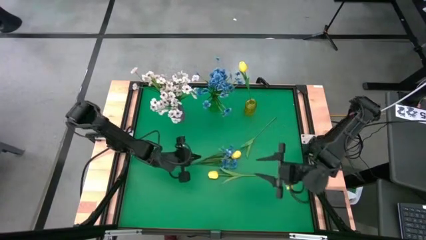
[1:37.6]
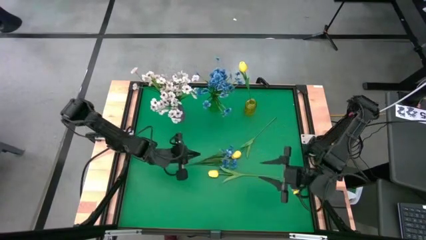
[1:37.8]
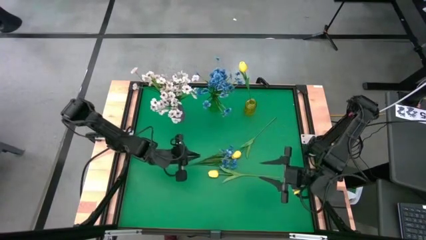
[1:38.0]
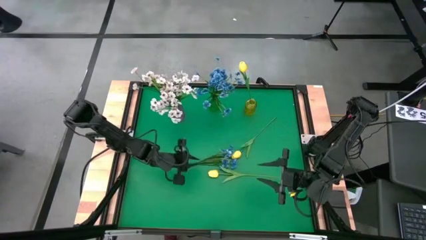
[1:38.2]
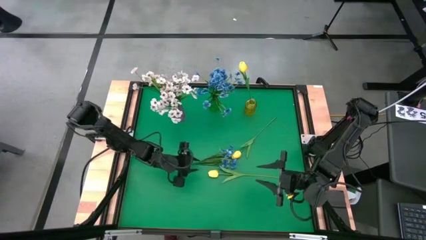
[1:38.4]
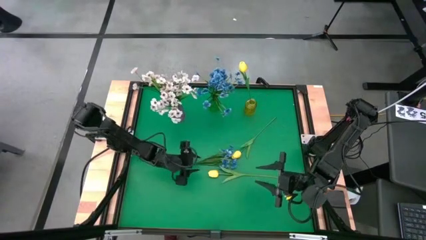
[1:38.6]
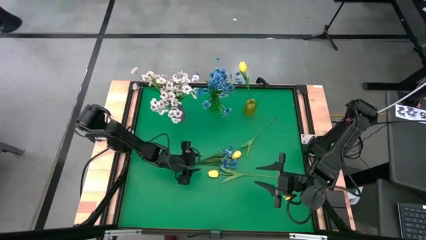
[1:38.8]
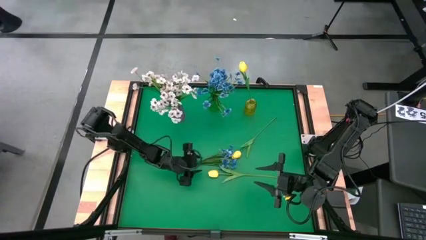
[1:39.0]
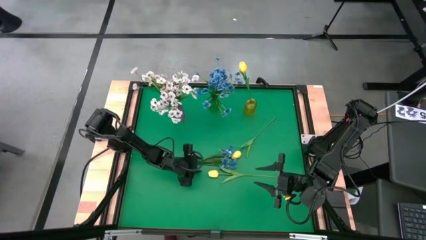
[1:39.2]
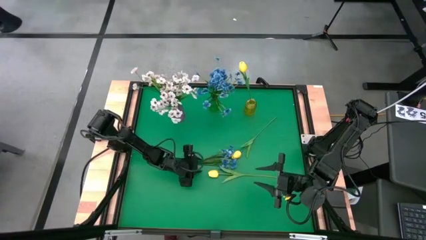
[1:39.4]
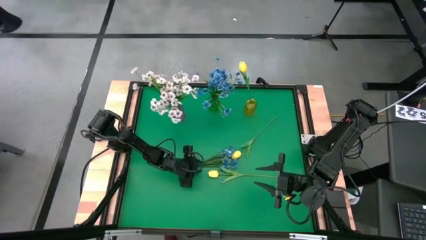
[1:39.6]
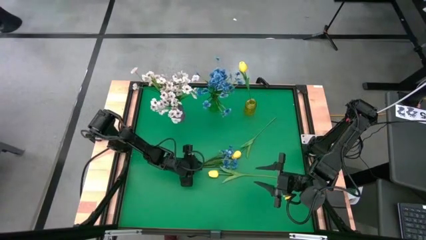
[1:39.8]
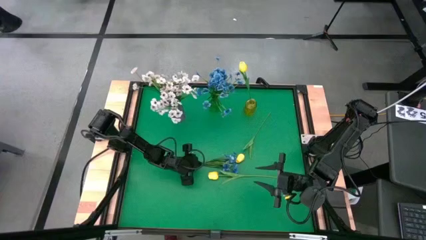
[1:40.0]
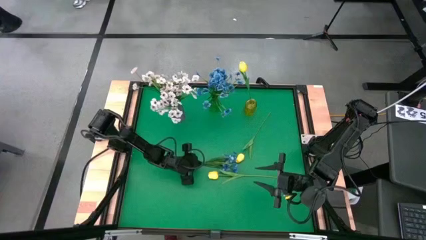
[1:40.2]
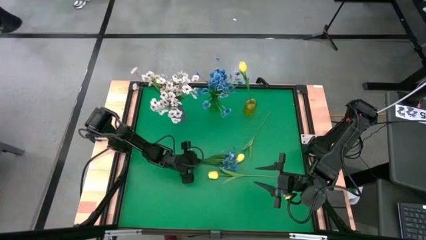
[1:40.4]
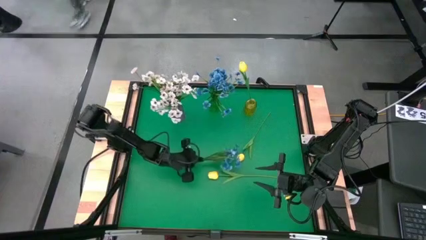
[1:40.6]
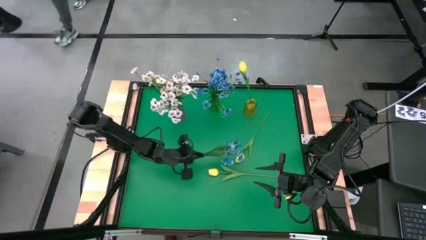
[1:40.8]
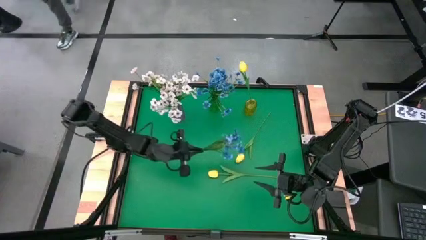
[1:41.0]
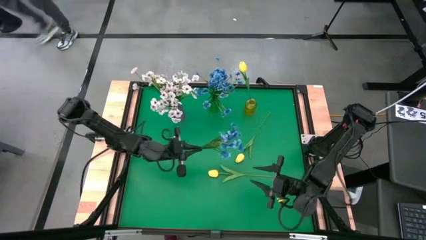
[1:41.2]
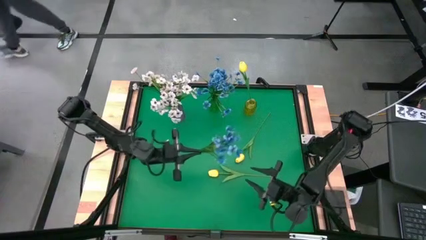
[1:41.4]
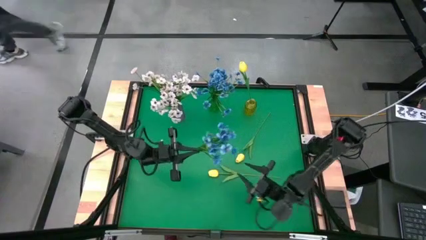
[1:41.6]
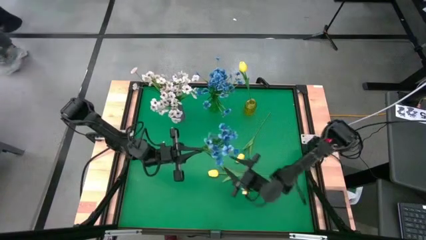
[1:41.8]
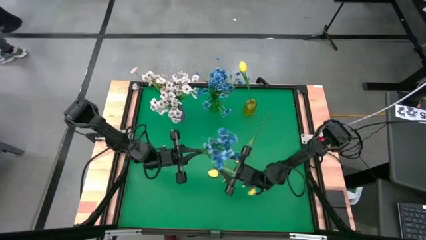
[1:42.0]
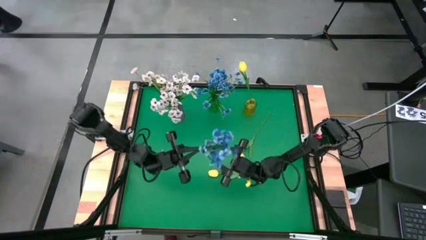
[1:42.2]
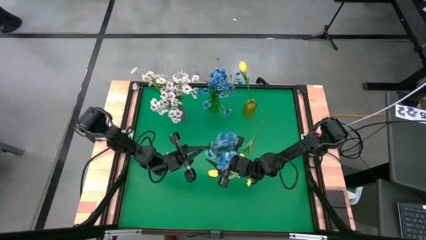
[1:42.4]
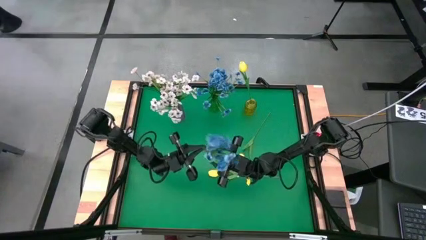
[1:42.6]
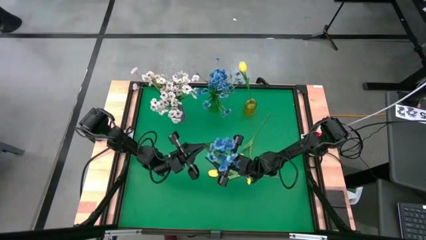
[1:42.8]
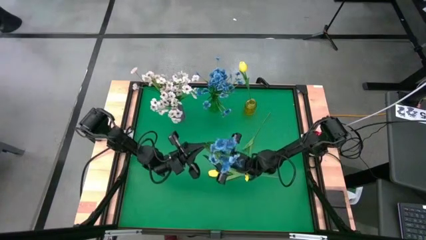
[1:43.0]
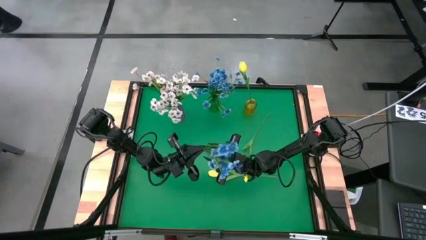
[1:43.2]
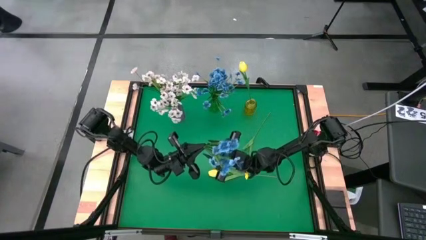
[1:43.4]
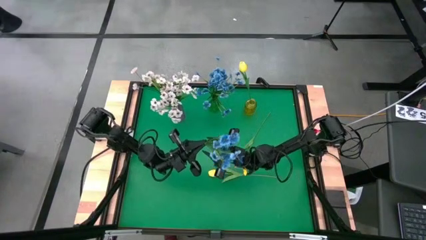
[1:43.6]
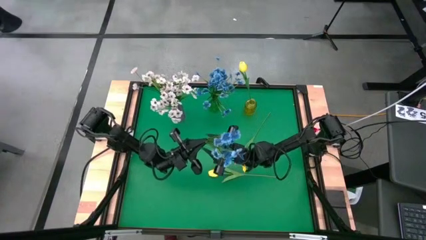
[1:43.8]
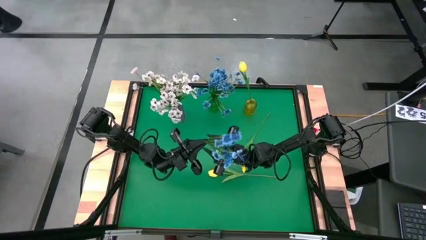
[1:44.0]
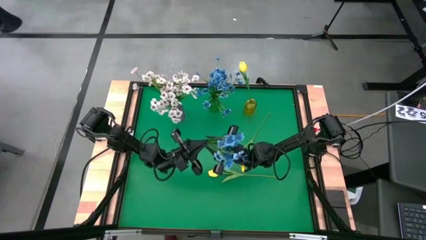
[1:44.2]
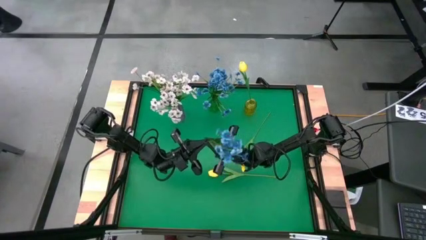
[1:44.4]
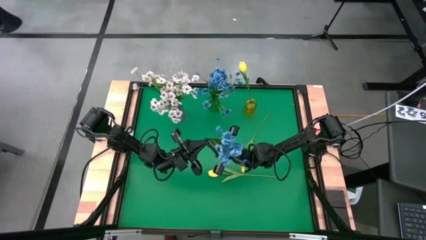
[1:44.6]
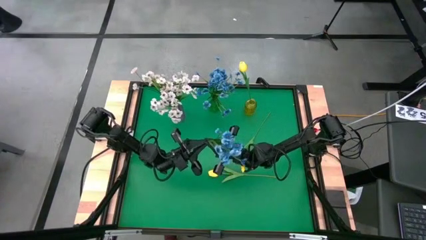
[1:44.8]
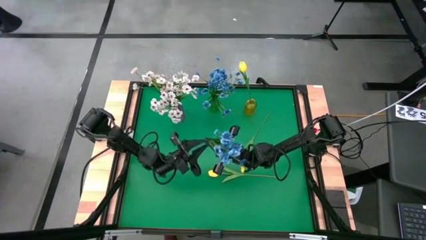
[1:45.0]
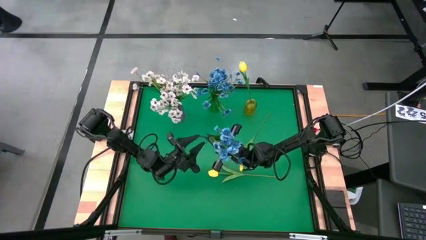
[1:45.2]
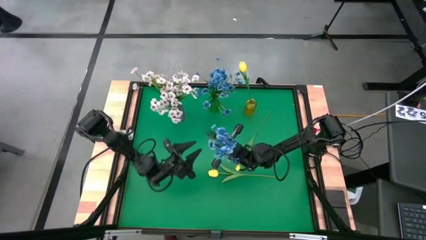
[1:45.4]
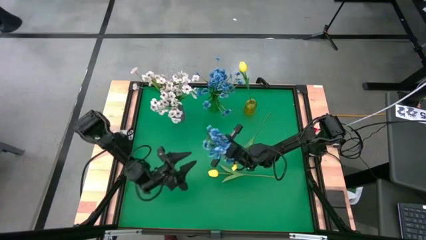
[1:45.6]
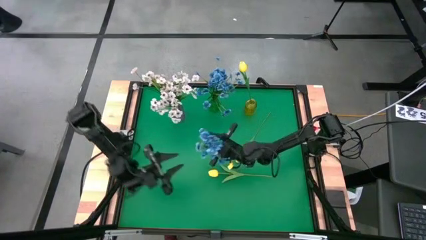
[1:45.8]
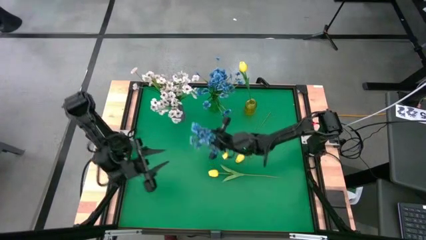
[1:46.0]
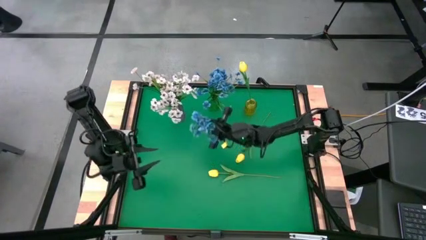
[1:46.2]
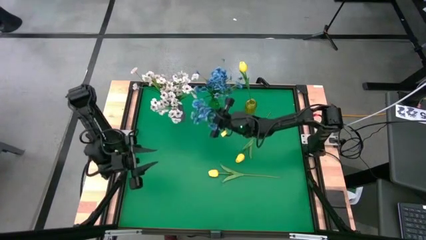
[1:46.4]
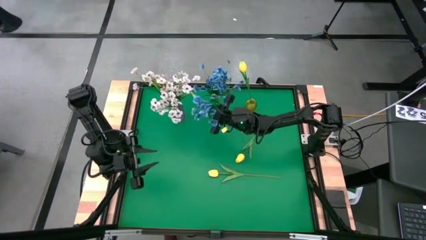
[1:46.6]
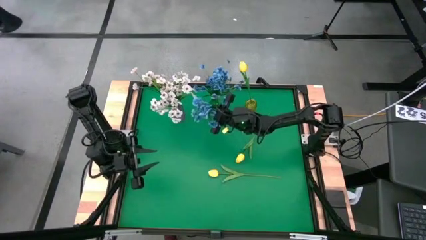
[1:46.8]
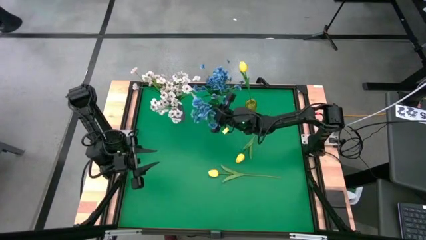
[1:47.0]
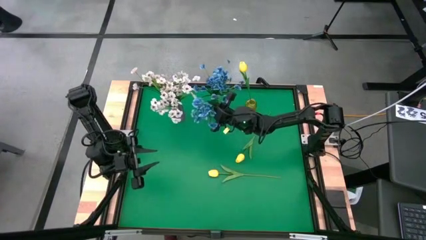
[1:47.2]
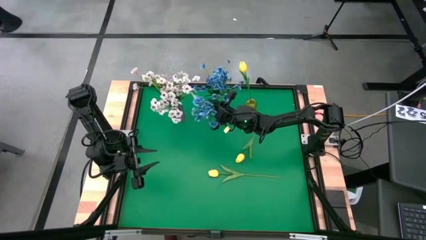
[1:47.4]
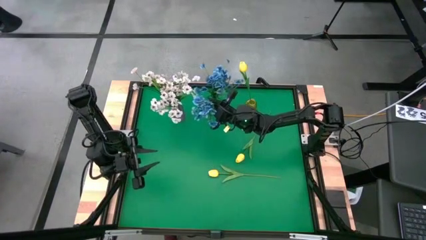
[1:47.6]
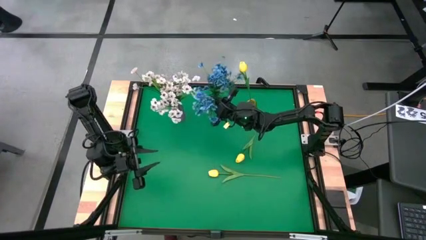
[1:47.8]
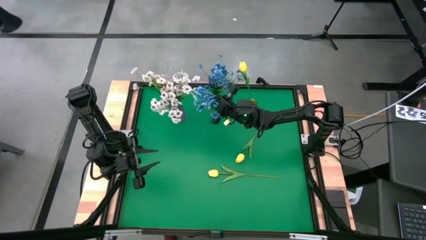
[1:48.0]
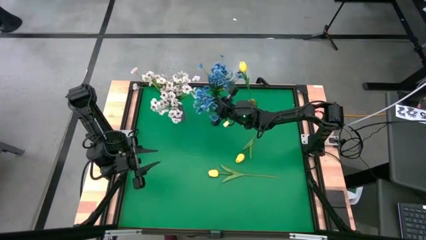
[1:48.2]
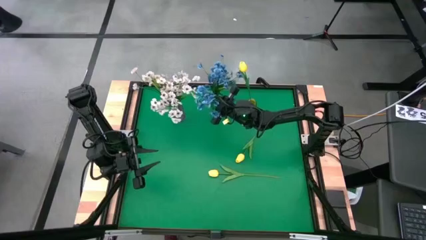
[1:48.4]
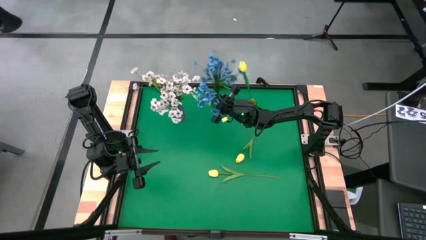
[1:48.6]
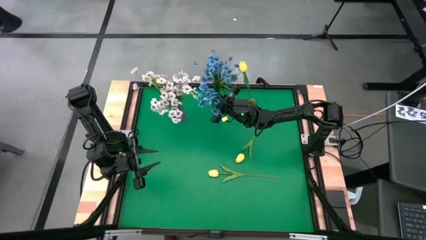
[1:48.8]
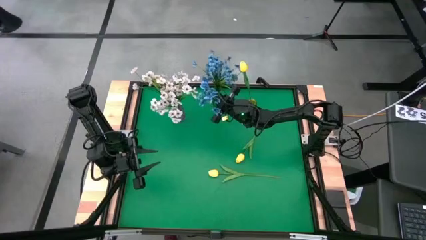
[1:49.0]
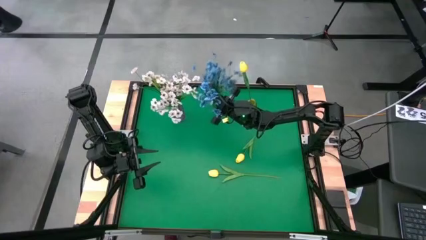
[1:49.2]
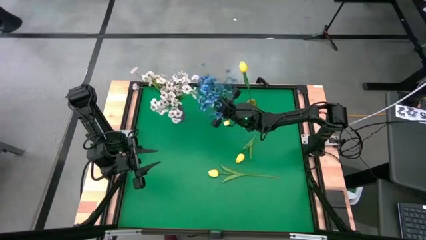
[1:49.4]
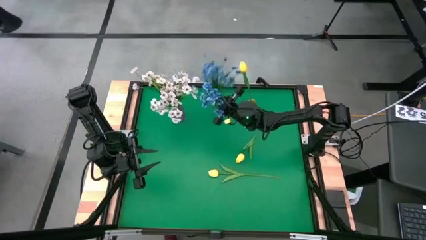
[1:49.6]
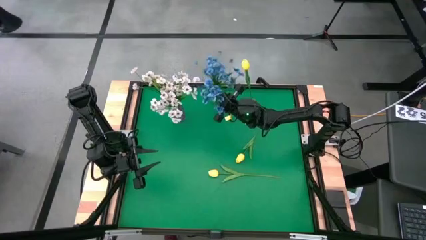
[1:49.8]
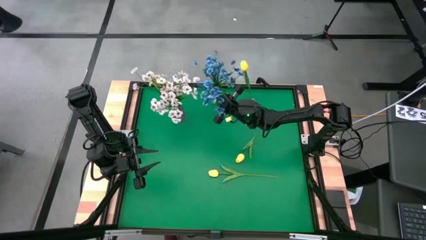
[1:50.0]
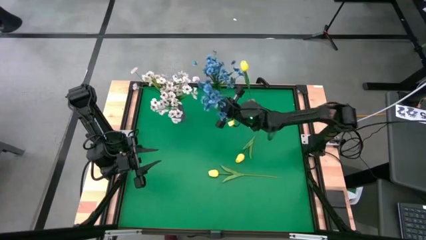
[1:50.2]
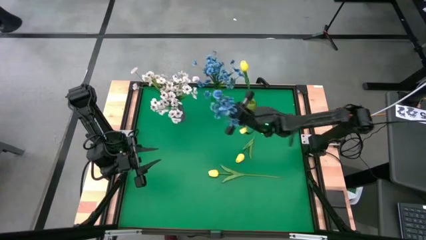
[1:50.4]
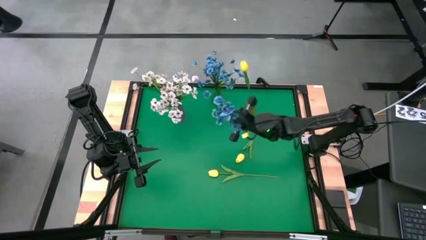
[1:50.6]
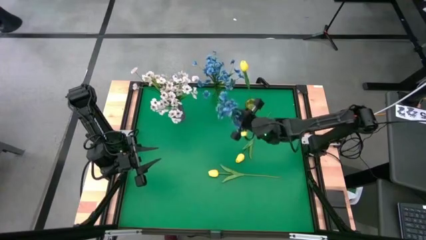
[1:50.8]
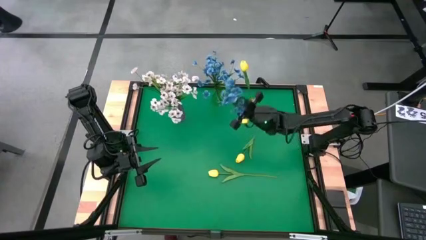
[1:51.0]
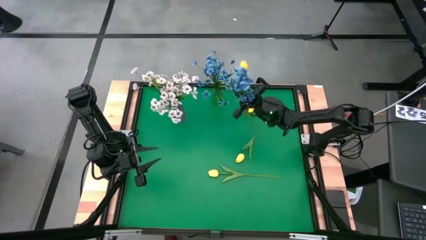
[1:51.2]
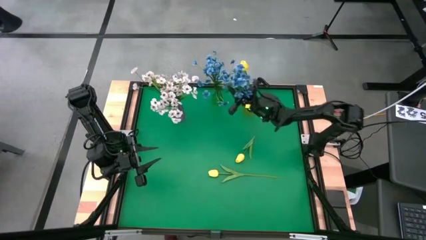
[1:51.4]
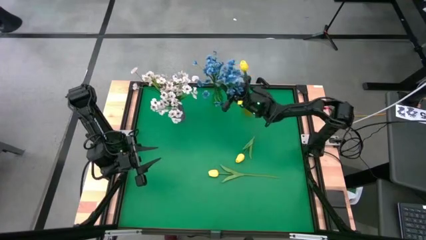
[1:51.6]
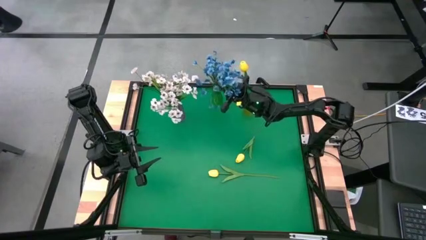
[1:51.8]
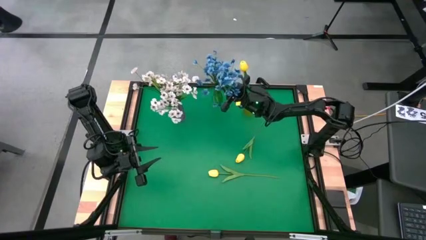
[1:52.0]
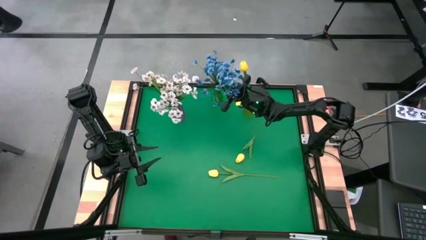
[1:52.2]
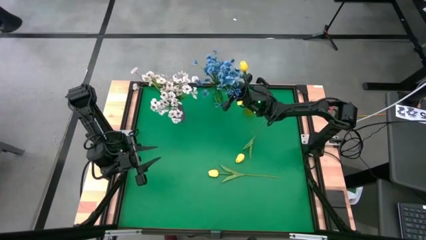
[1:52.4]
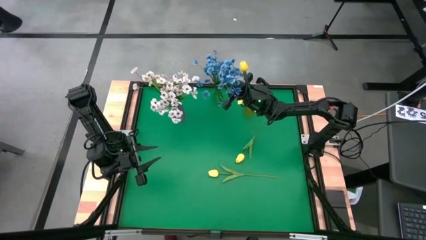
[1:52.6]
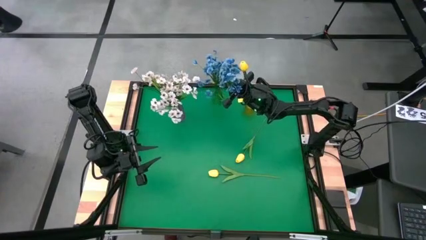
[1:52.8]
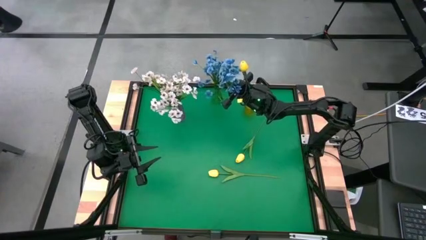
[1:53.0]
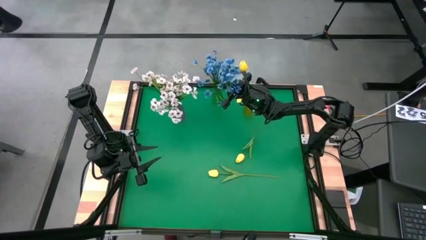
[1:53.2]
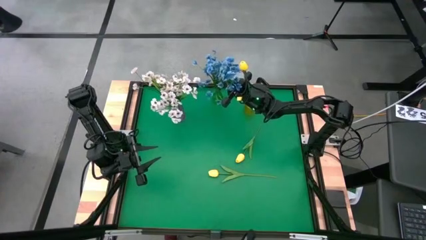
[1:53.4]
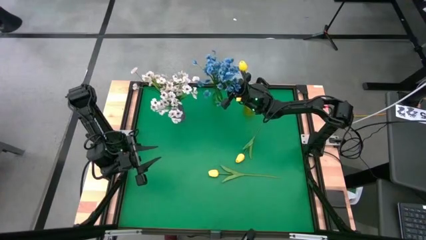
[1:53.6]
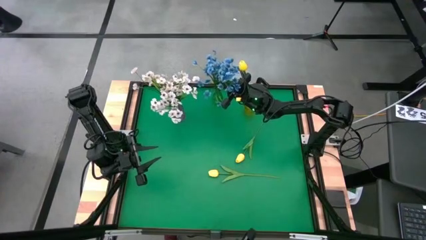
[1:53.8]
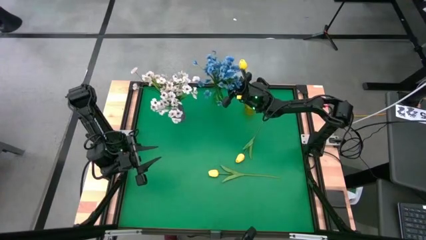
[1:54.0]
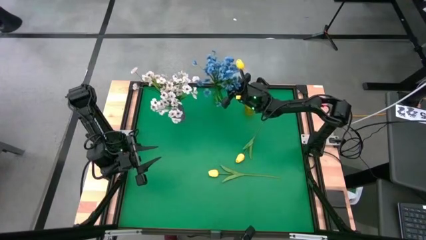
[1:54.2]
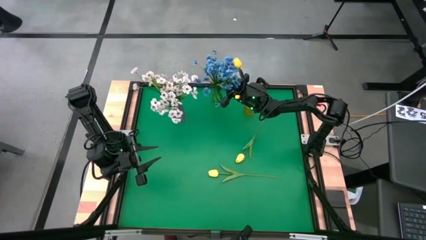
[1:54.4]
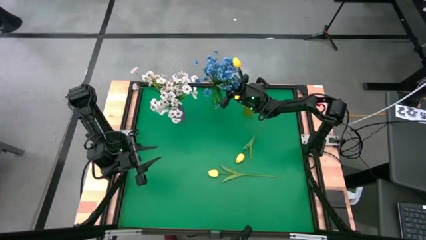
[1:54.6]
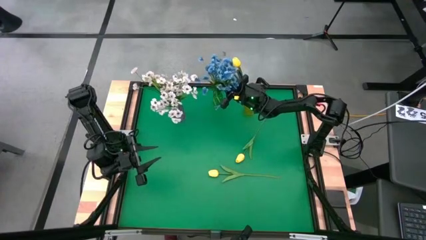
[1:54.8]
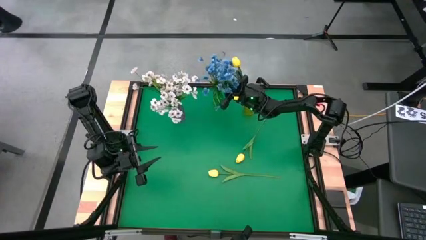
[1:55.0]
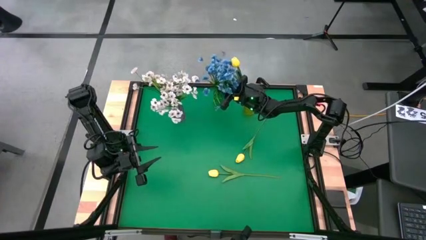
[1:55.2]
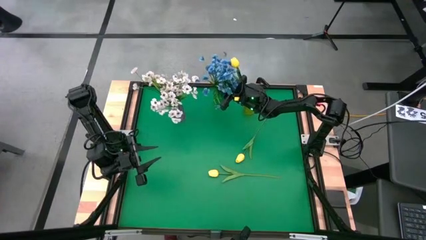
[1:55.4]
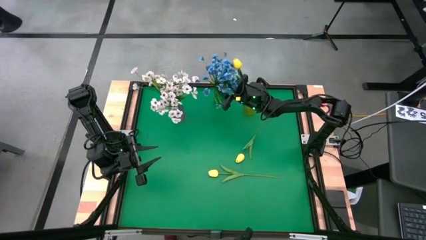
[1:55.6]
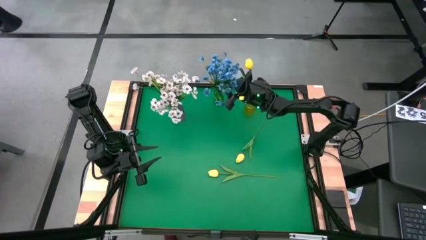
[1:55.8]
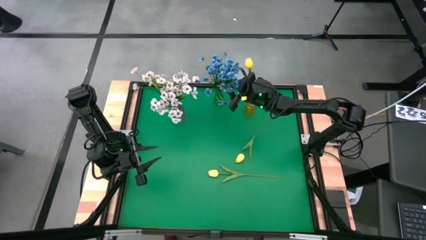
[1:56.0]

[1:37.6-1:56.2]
Task: Sort flowers into vase by color
Put the blue flower into the green vase
